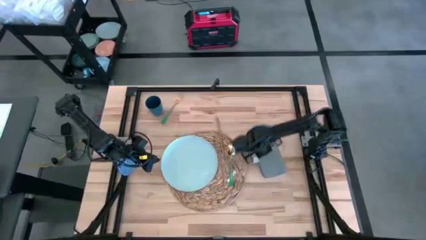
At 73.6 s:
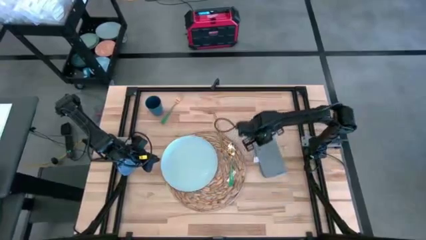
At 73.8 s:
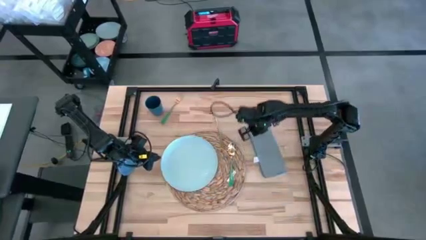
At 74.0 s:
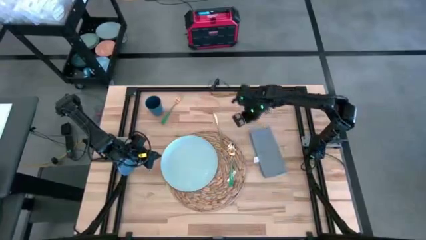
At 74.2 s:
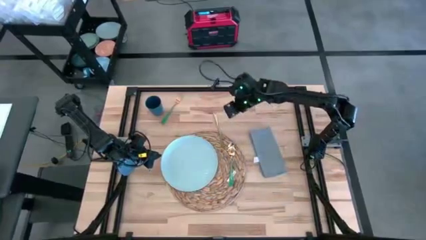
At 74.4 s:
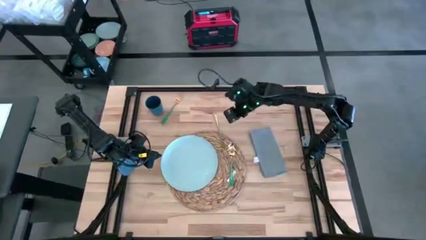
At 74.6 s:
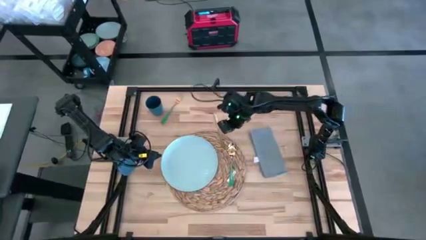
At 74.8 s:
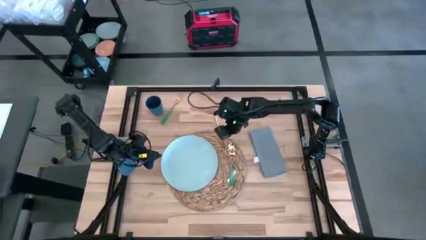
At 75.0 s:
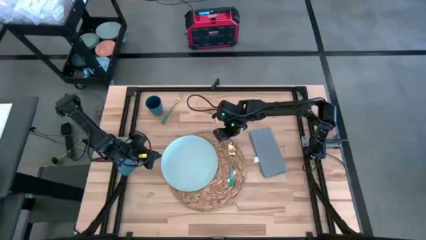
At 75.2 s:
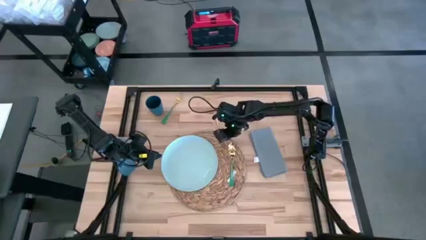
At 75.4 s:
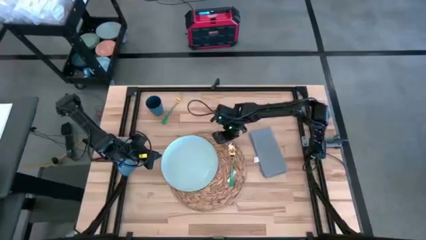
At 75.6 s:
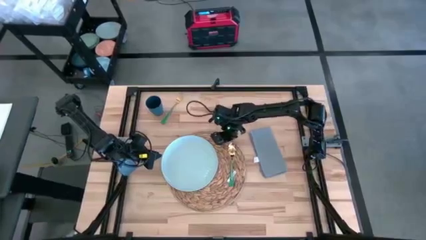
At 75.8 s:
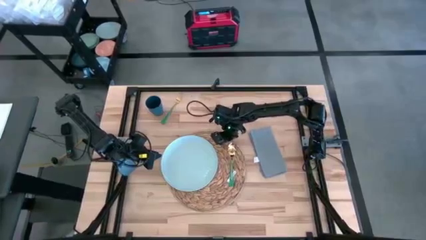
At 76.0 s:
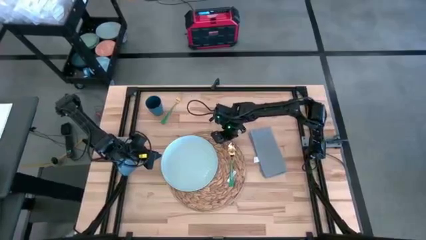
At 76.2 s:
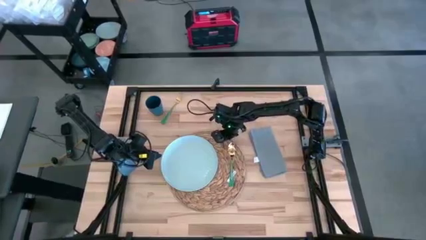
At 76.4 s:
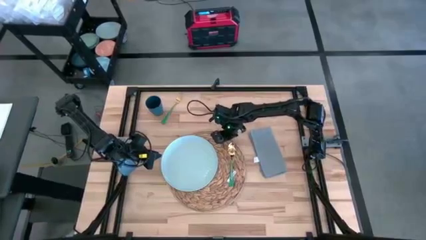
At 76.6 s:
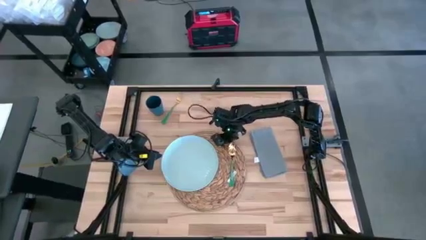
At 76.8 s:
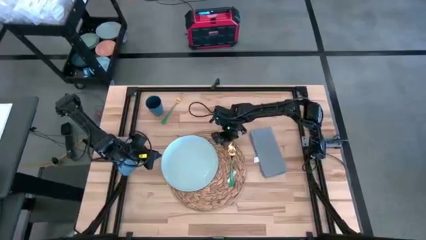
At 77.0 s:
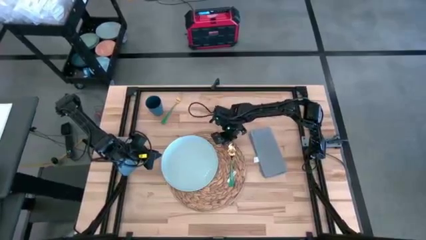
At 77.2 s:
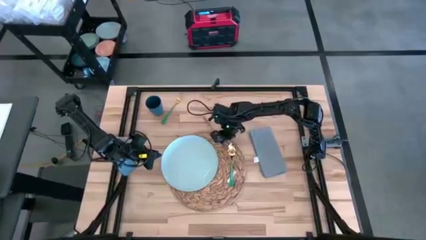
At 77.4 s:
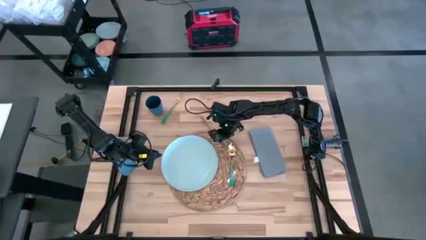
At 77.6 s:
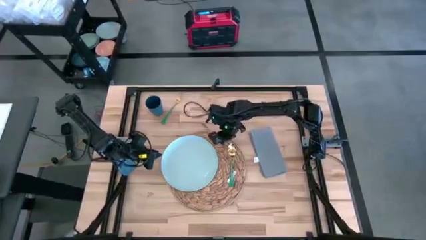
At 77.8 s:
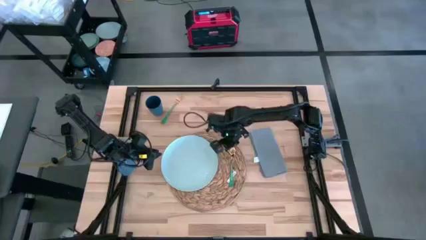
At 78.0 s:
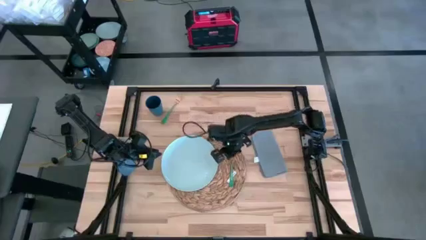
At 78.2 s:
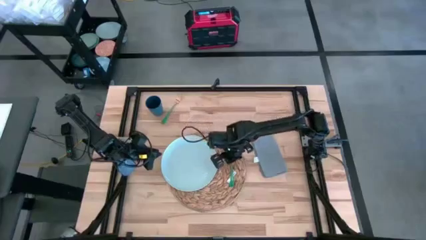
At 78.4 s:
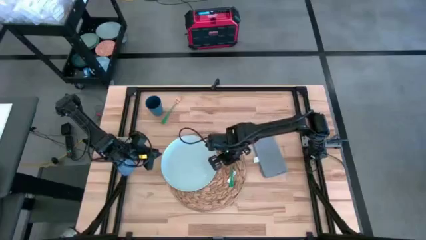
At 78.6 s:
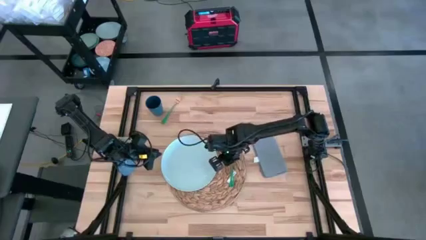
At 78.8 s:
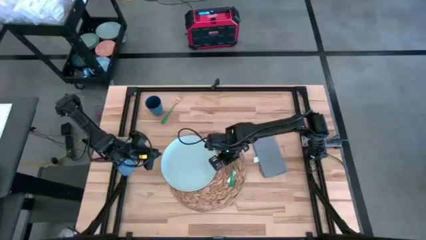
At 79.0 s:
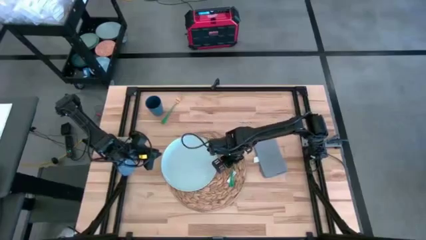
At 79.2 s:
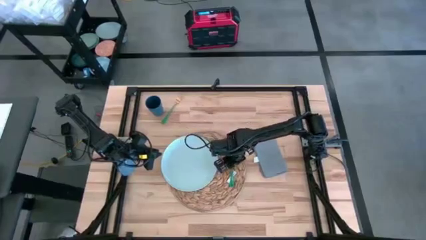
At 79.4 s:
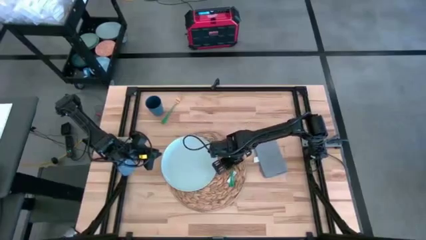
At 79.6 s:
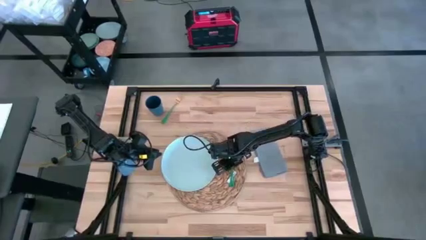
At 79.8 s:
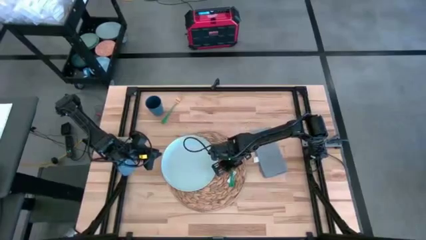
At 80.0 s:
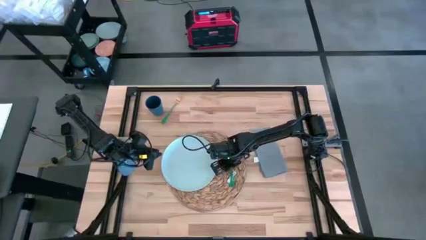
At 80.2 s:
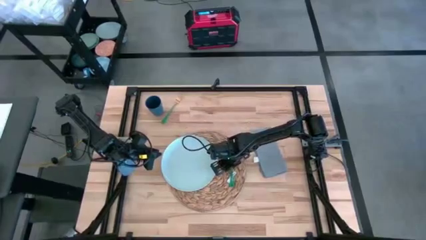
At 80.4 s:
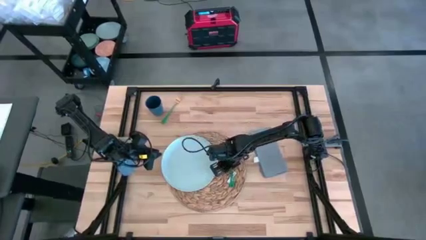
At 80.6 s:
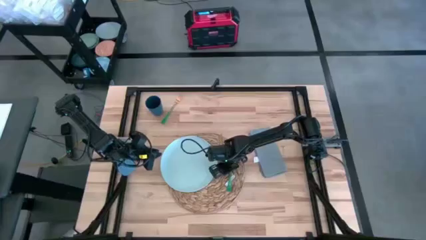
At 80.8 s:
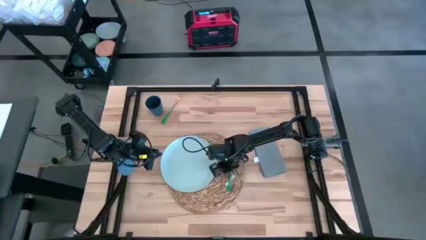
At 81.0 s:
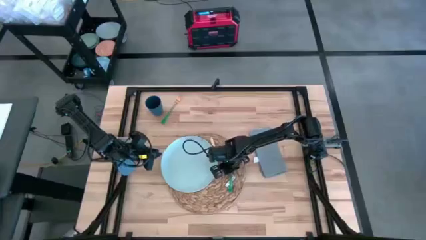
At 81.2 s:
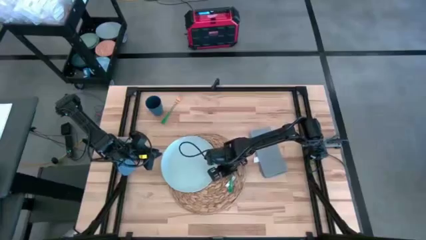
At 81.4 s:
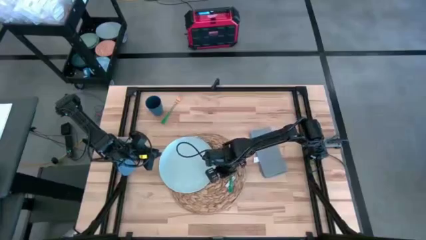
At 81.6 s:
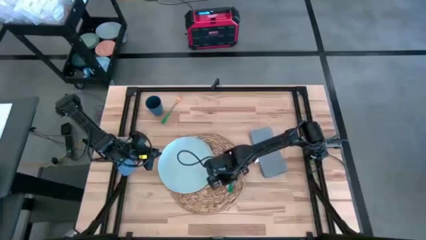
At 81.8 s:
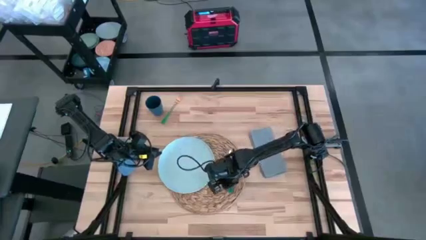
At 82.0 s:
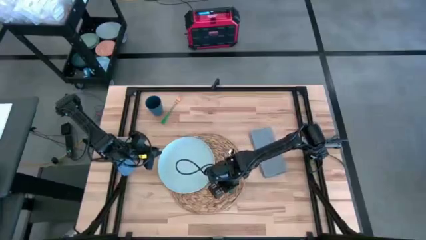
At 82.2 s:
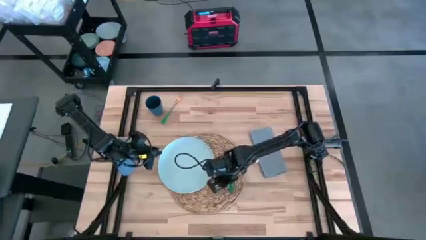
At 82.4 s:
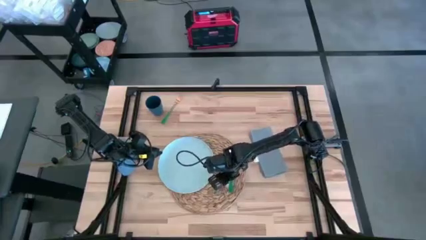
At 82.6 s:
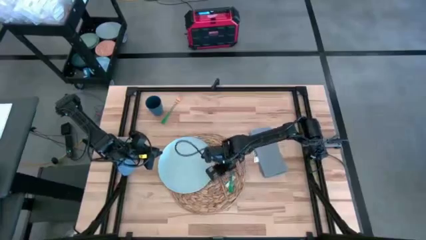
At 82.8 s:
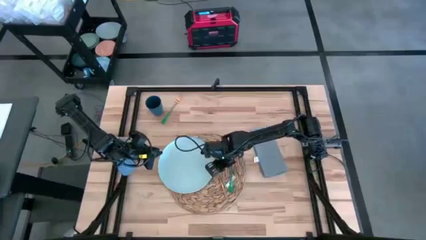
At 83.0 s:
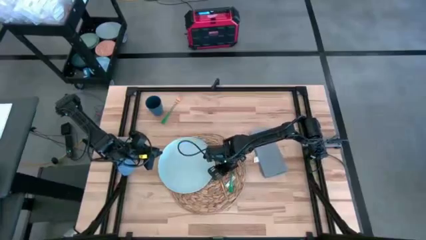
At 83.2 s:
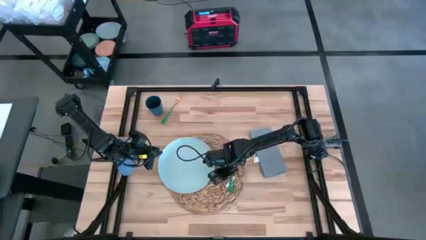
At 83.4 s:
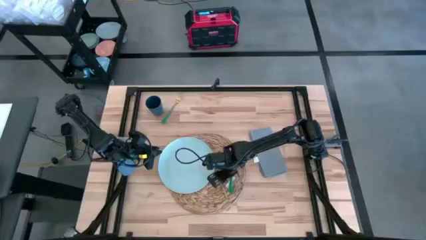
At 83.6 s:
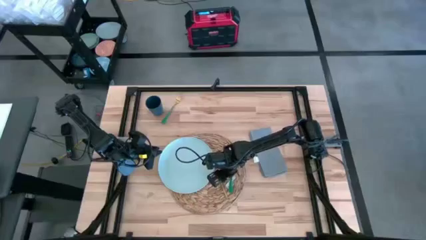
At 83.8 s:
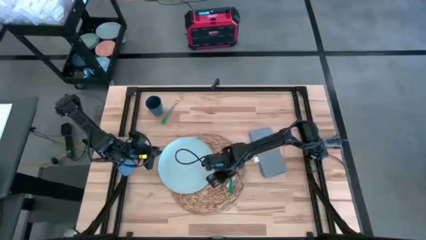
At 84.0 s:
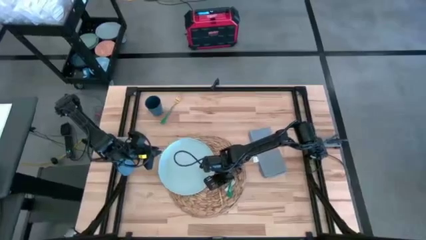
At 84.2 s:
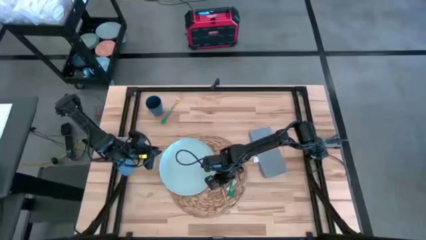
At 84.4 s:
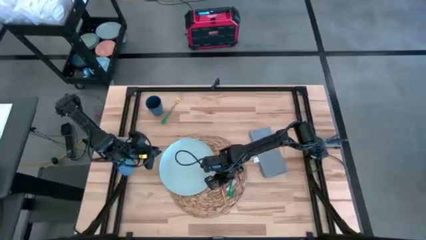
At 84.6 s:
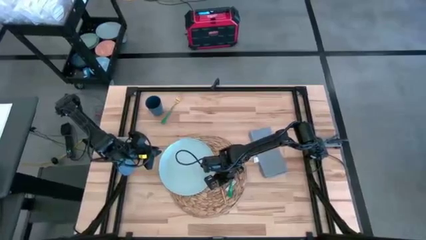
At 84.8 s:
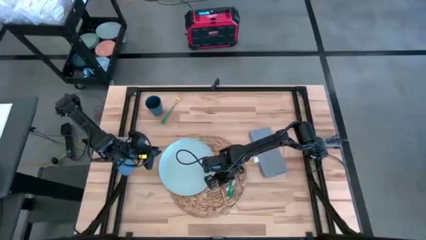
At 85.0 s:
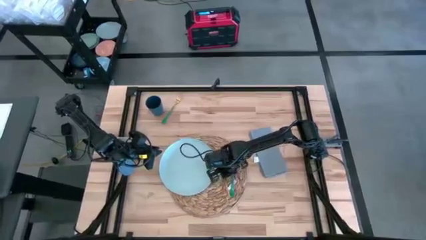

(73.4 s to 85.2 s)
Task: Set table place
Adjust the gold table knife on the brown placemat

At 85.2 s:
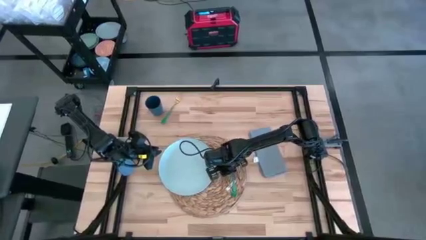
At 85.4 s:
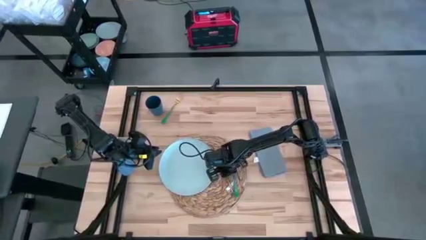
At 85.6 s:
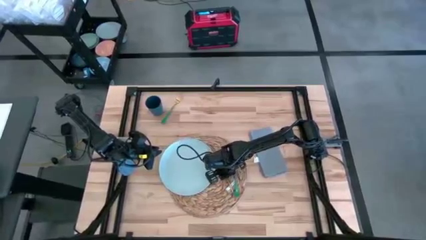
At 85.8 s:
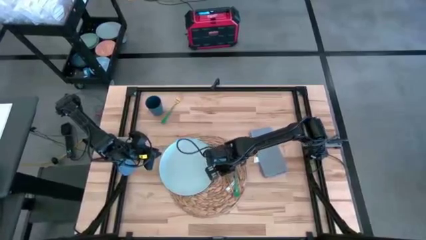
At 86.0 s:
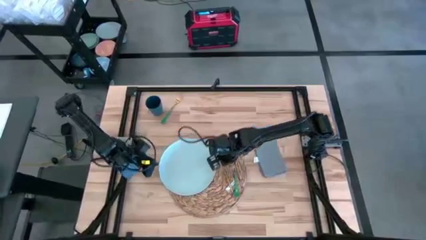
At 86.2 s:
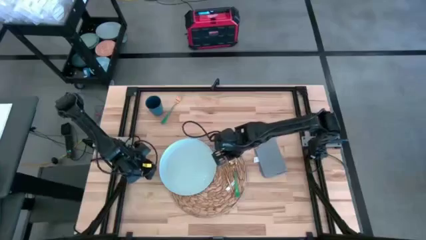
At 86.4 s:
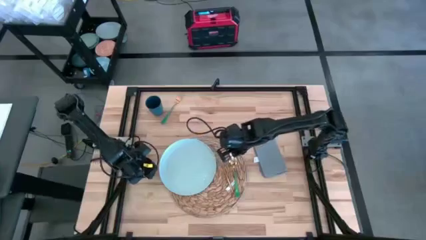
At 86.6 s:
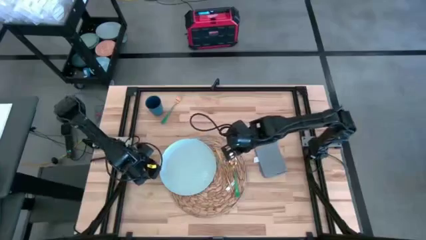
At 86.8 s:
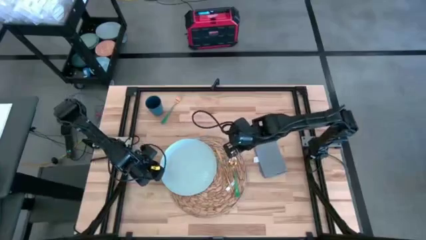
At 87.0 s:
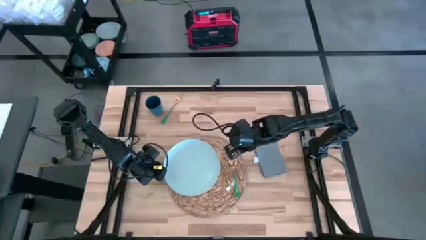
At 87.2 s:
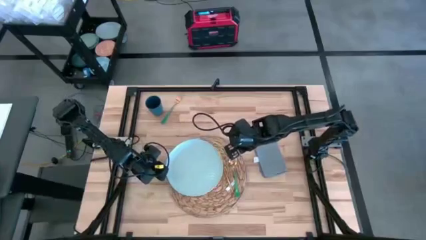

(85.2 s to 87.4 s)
Adjust the light blue plate on the brown placemat
